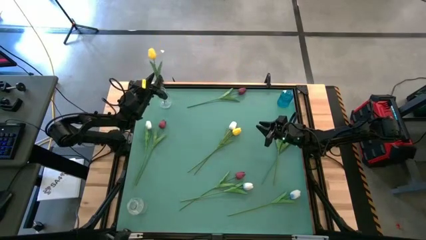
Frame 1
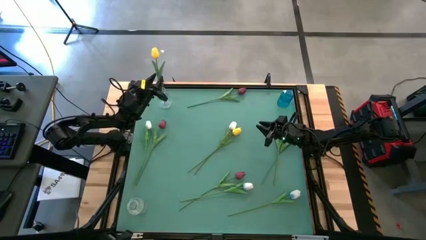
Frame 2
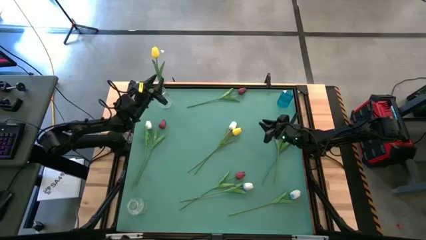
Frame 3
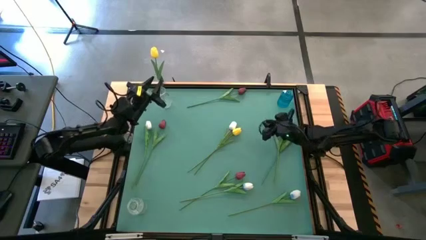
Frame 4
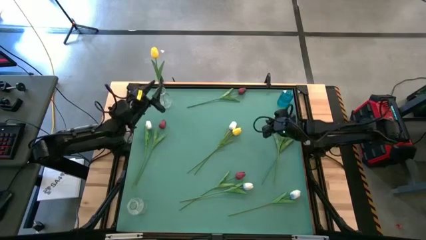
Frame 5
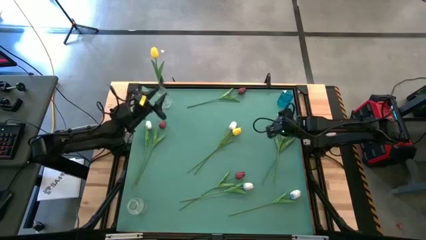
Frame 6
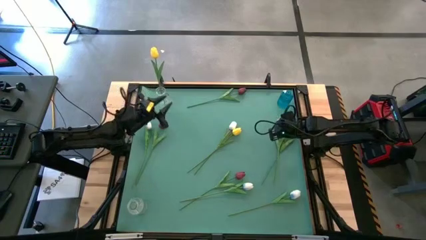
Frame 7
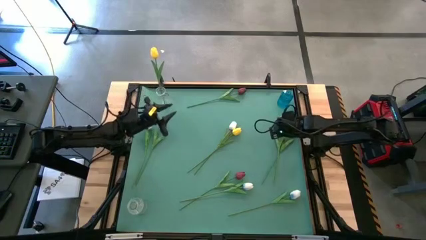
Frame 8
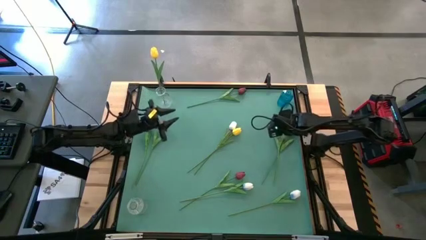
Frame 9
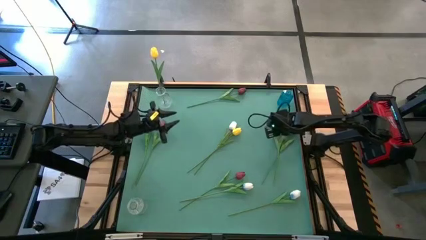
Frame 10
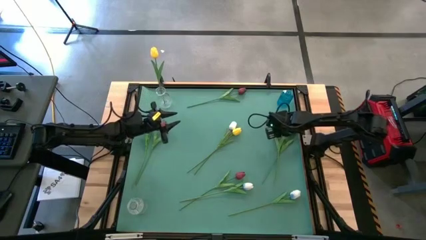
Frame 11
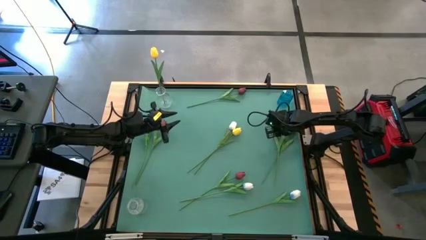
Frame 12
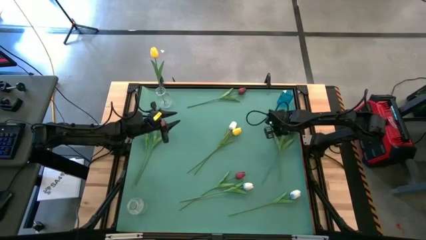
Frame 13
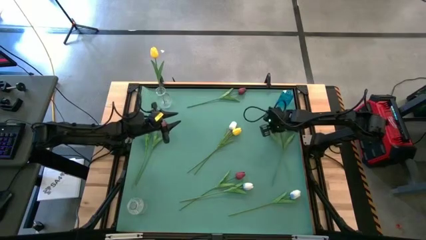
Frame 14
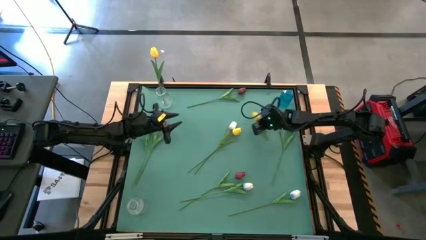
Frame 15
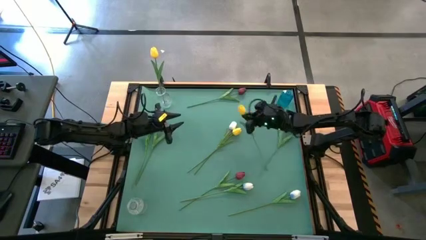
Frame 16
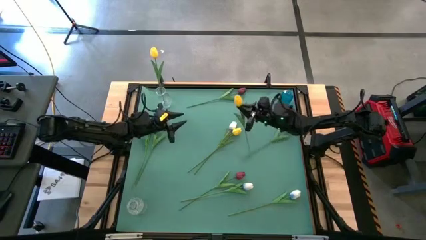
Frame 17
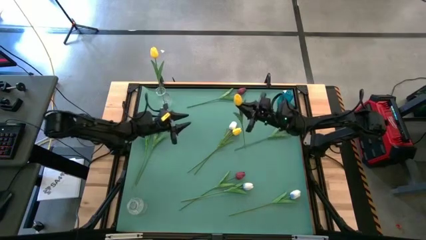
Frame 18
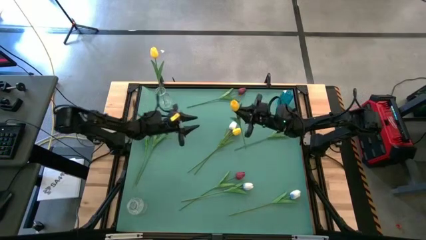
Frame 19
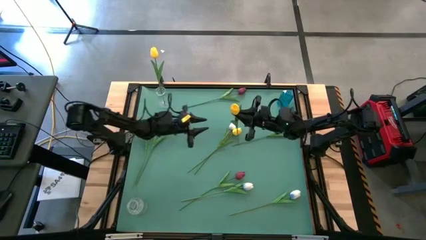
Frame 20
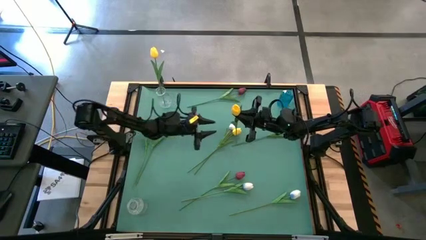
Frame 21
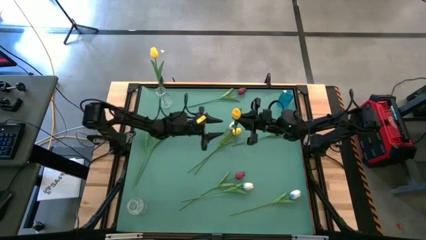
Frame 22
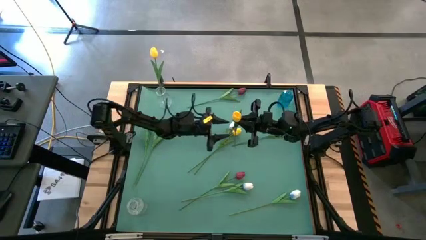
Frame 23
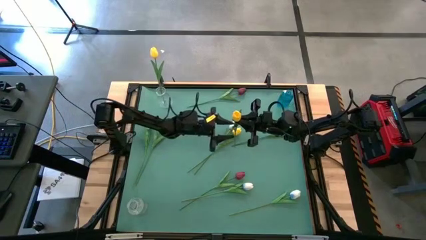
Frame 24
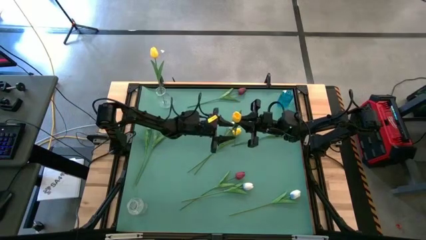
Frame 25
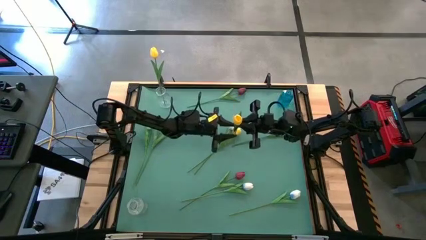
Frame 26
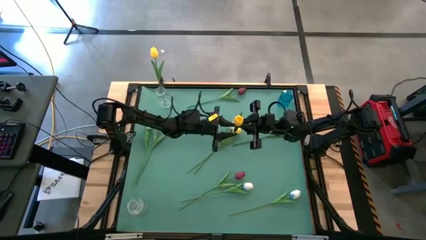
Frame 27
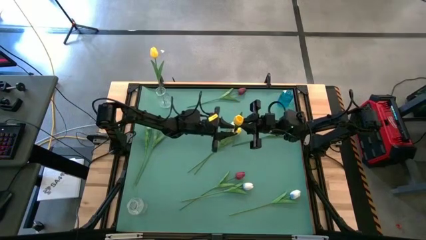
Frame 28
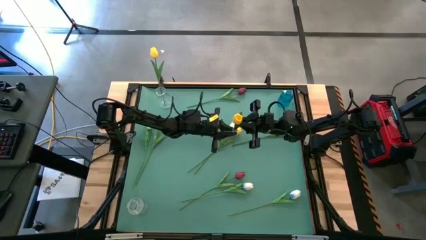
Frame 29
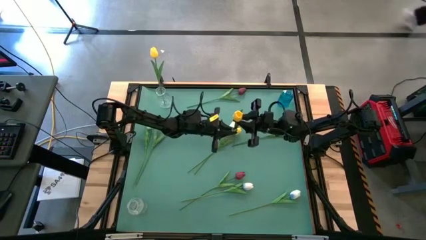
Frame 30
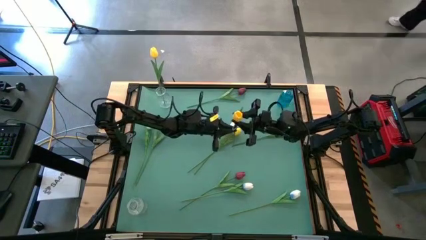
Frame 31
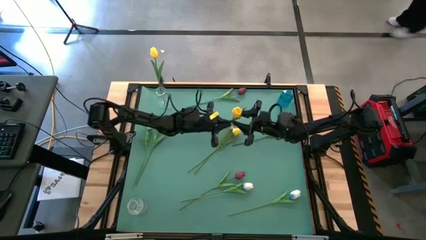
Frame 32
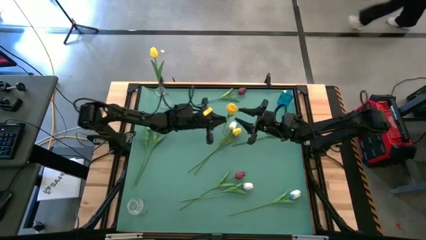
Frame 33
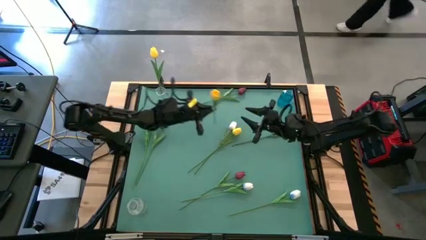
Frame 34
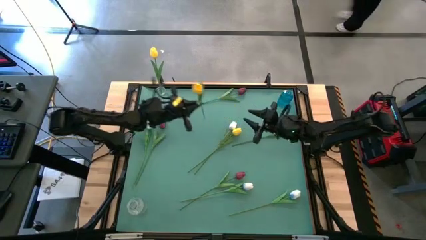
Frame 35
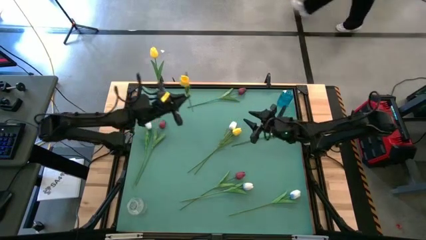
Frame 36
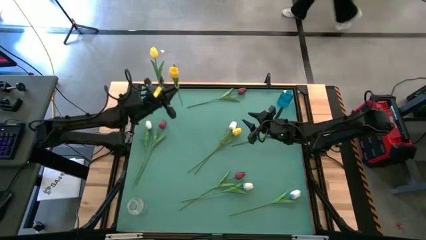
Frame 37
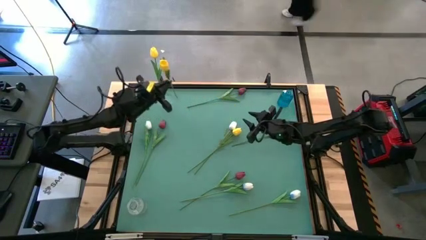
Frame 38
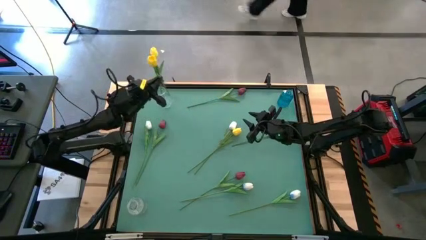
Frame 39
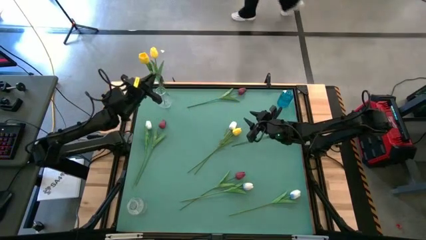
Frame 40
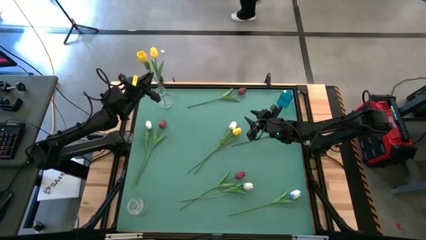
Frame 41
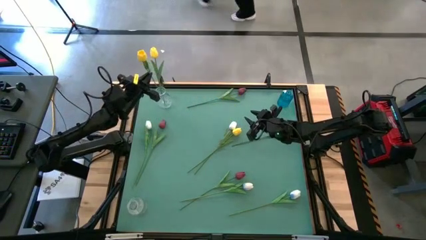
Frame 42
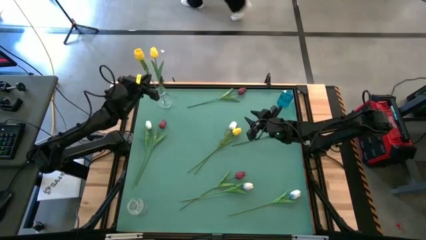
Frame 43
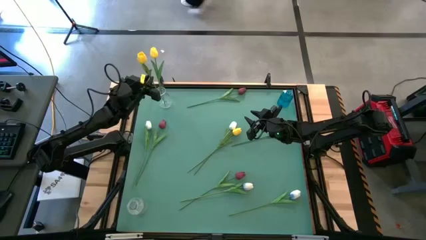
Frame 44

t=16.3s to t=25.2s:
Task: Sort flowers into vase by color
Put the right yellow flower into the top transparent vase

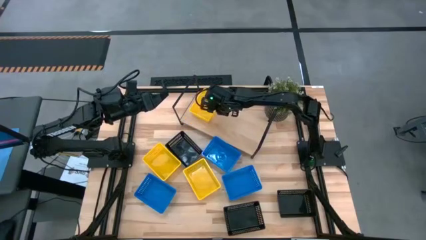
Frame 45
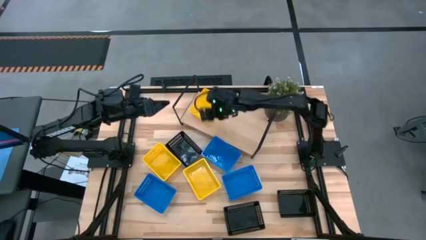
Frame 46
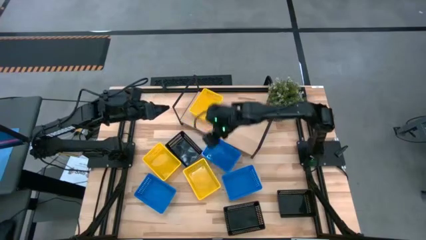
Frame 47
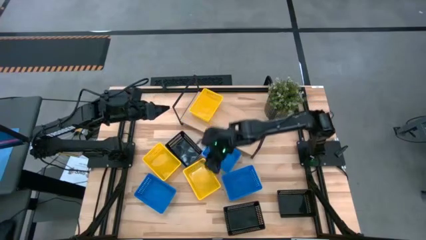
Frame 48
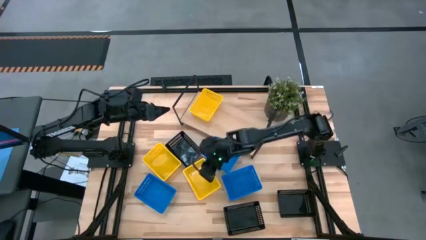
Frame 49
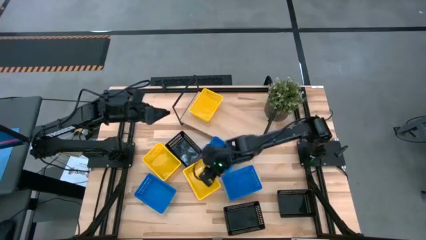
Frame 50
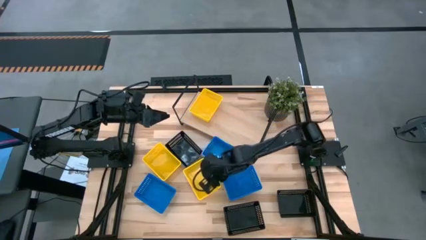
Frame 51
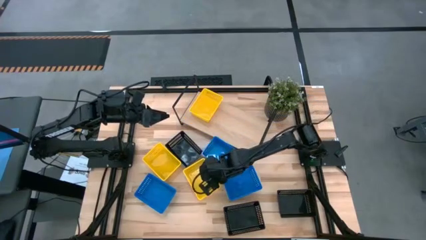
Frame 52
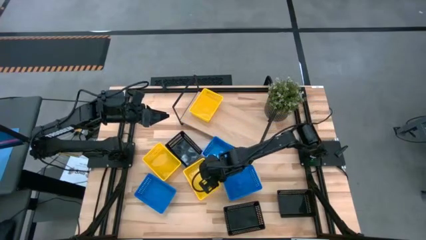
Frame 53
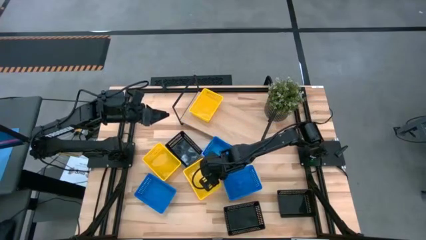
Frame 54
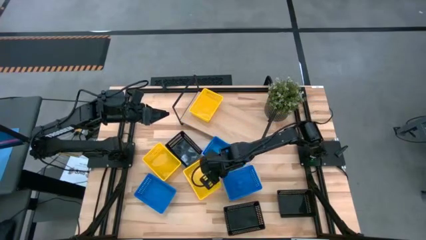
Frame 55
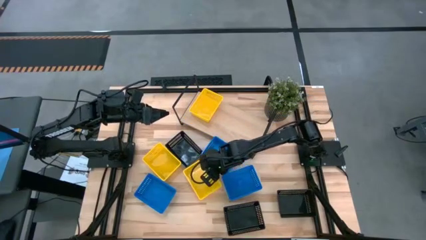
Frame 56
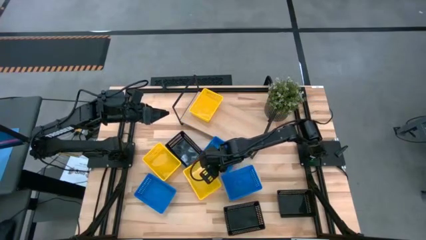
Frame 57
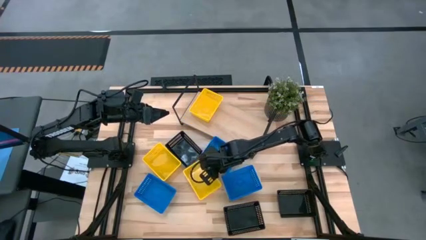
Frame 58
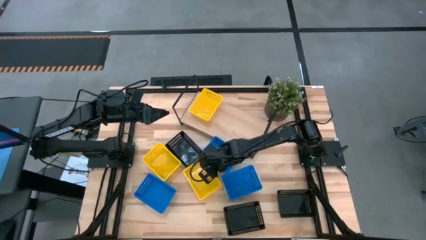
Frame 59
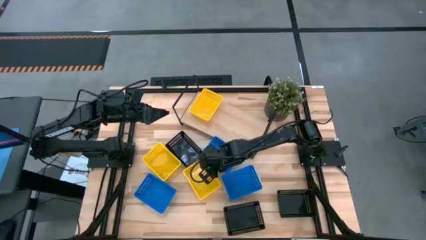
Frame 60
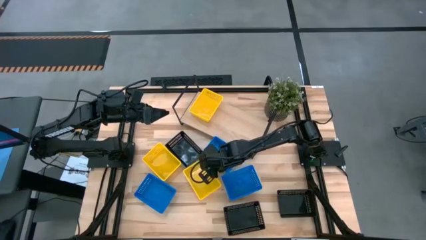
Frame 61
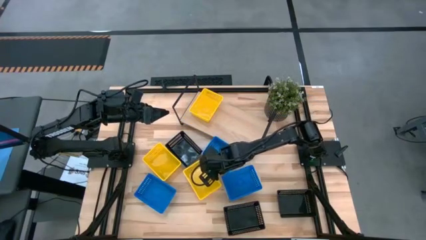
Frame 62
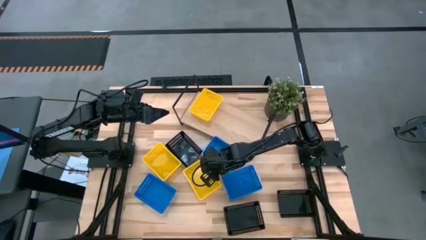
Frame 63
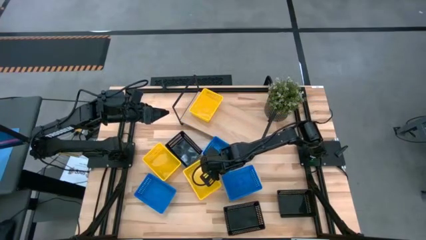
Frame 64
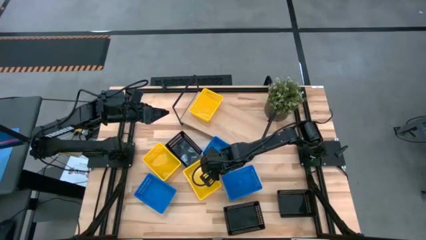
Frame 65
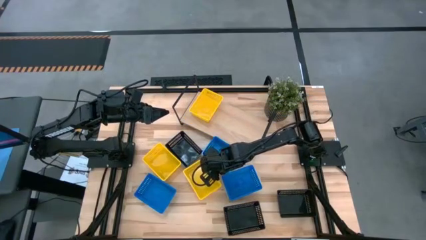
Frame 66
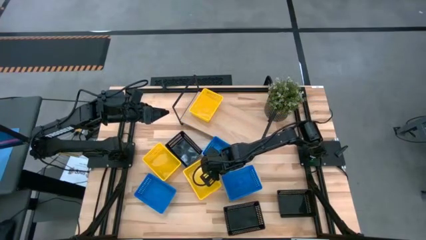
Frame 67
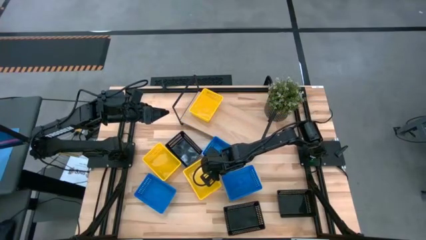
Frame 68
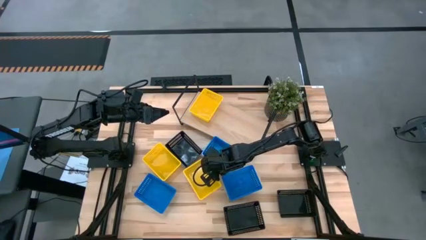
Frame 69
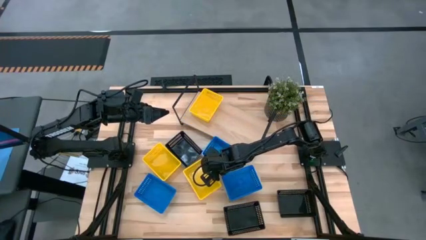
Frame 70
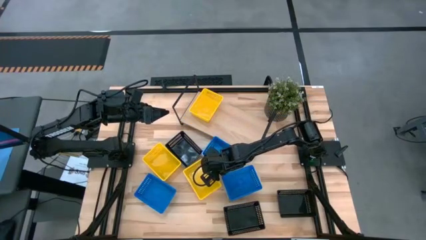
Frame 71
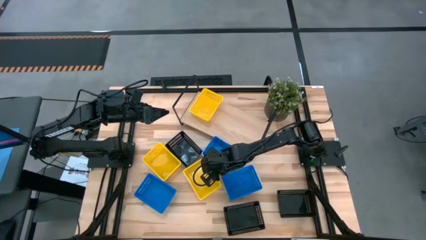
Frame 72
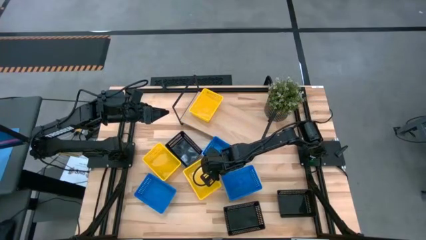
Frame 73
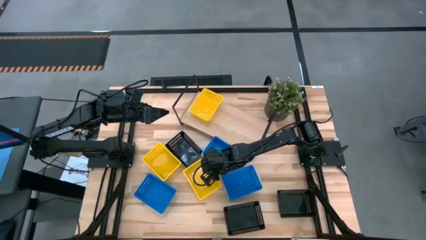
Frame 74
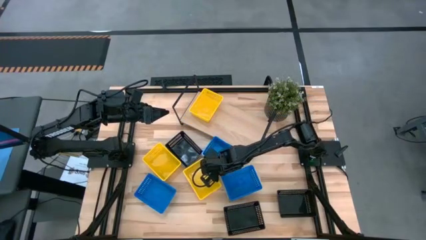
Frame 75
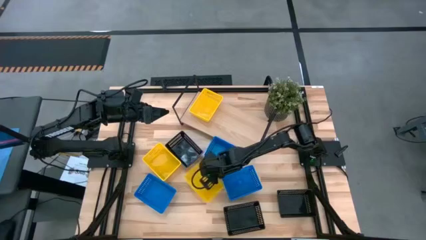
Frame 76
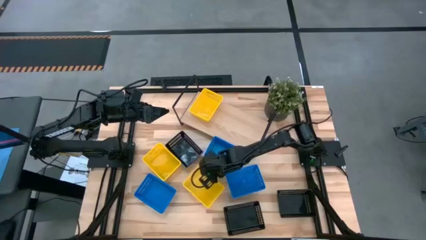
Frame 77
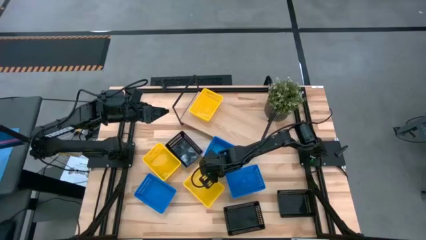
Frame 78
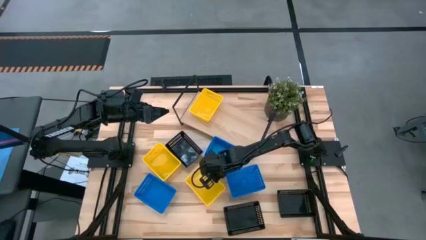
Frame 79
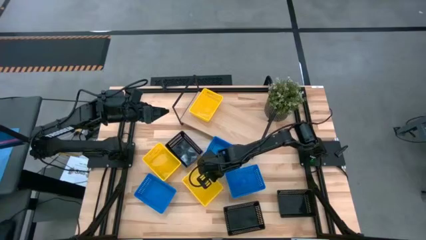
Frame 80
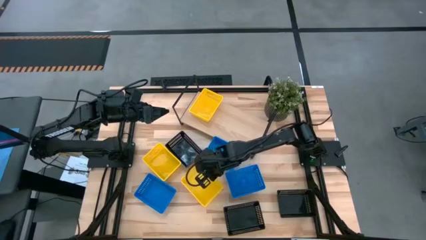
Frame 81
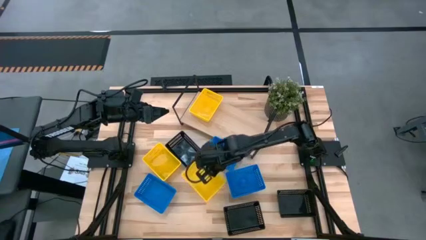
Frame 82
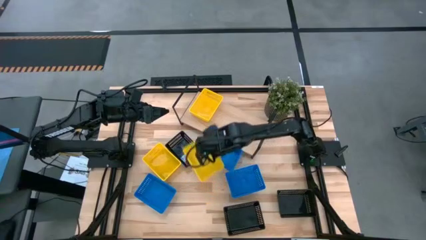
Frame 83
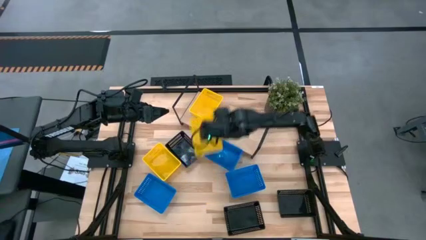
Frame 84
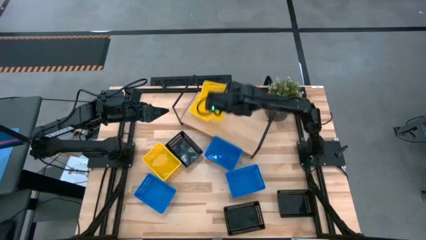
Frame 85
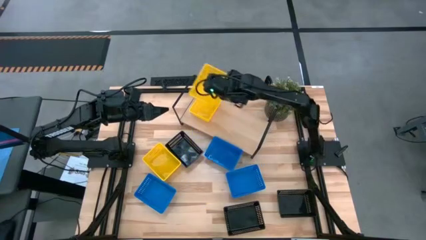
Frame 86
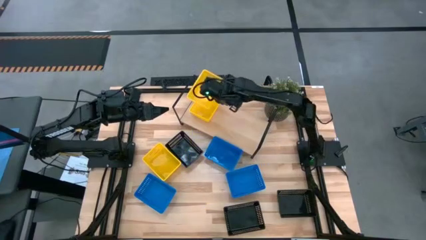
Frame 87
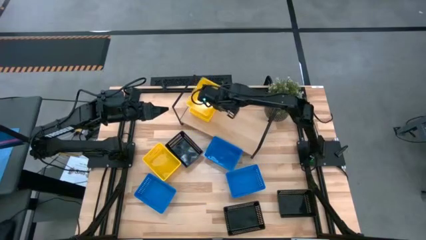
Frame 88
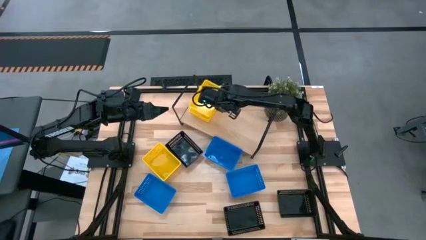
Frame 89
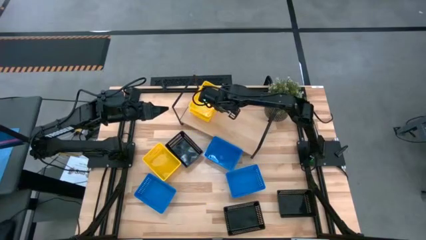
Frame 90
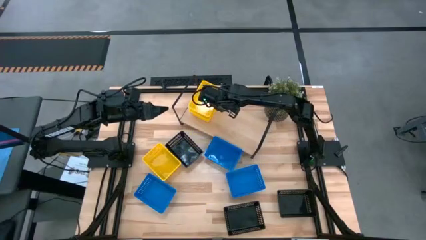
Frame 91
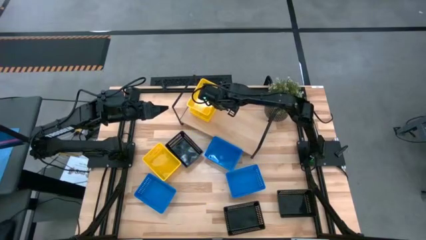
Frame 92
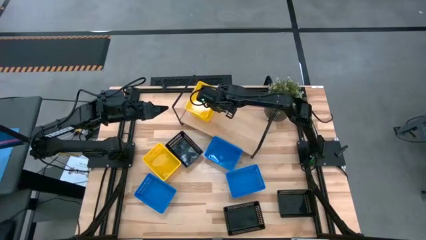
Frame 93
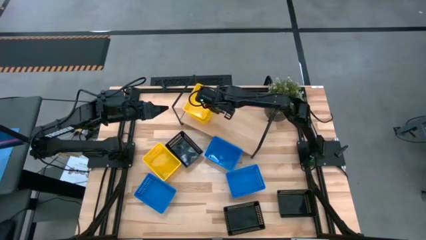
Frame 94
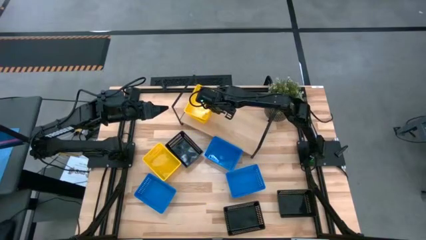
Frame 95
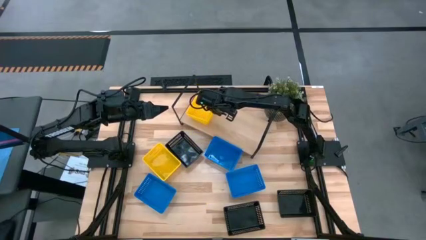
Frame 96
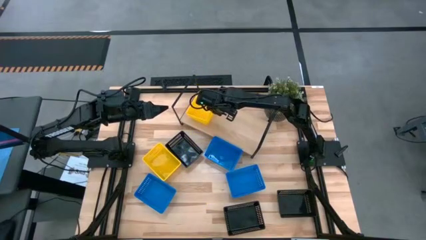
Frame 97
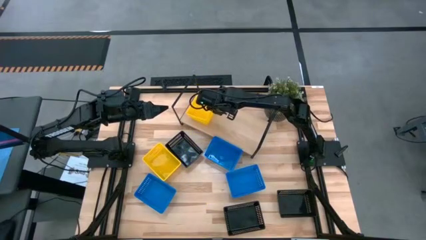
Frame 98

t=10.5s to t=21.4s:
Task: Stack baskets on shelf by color
Stack the right yellow bin on top of the yellow bin on the shelf
